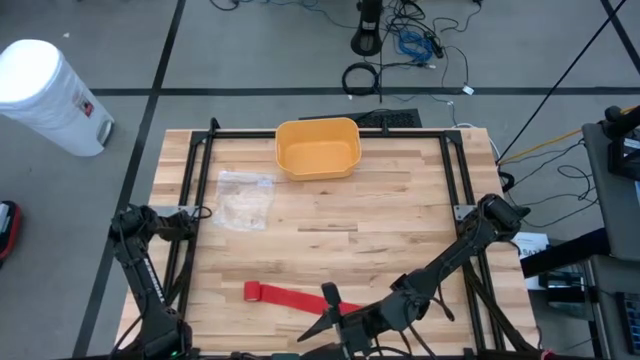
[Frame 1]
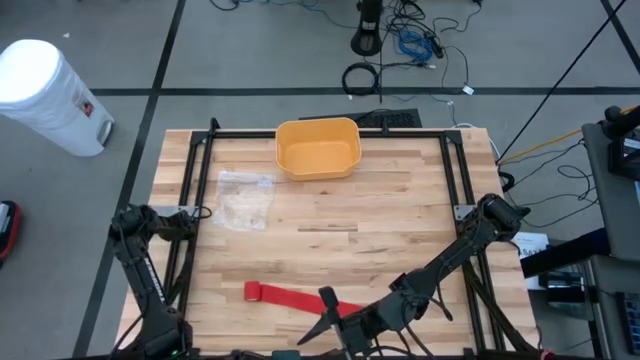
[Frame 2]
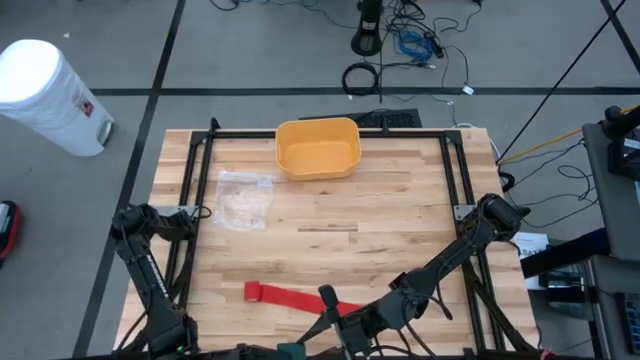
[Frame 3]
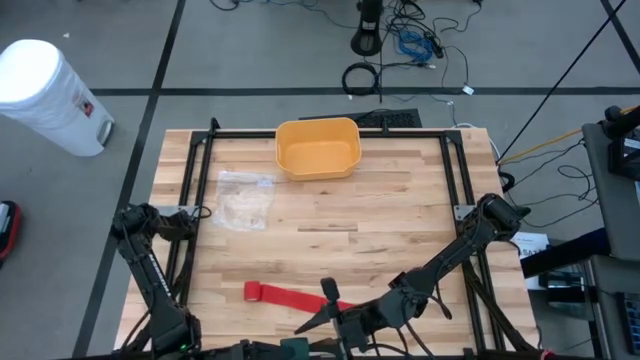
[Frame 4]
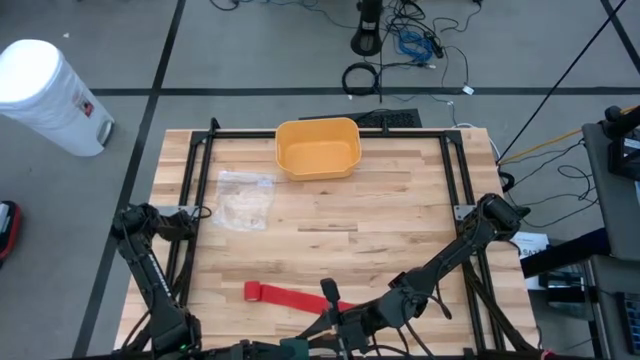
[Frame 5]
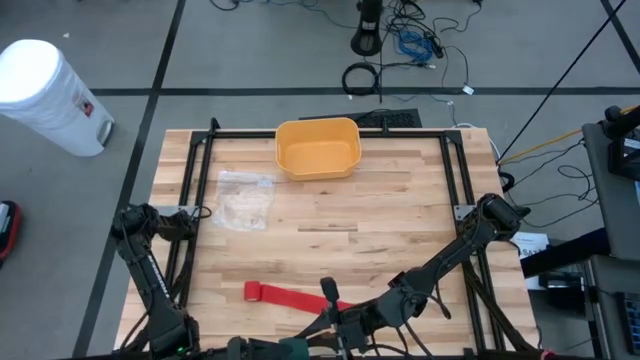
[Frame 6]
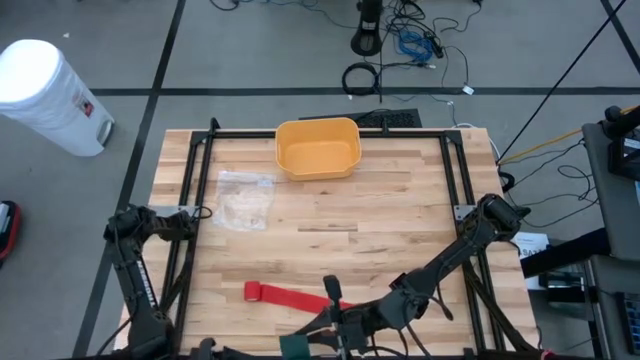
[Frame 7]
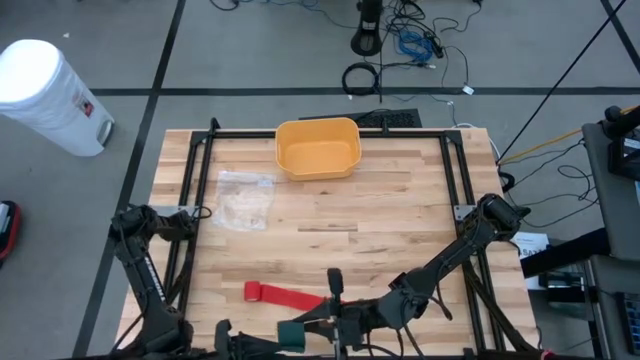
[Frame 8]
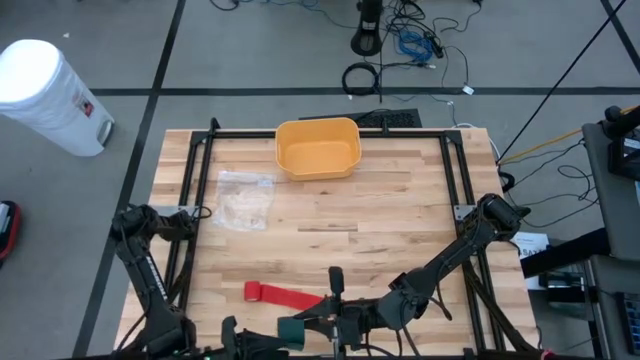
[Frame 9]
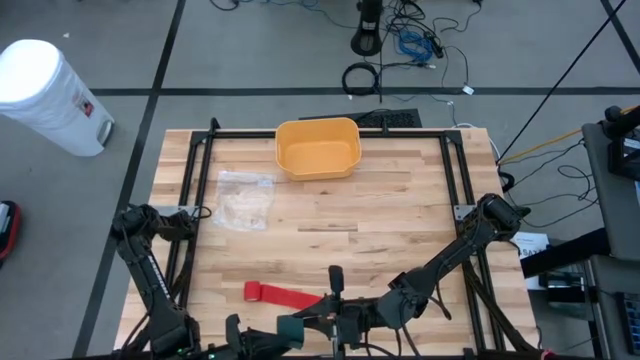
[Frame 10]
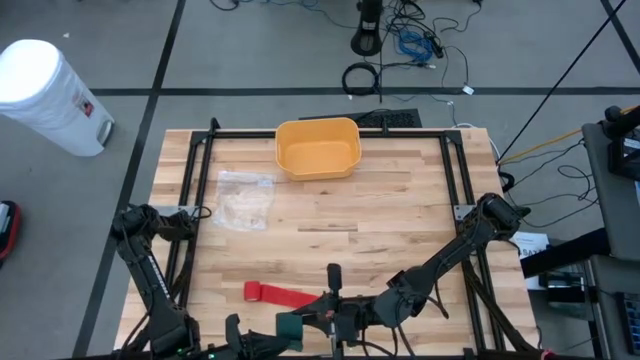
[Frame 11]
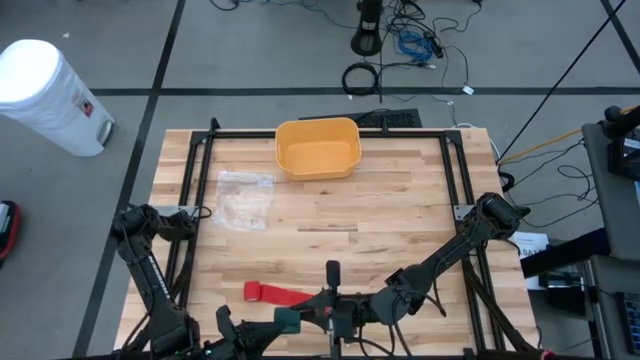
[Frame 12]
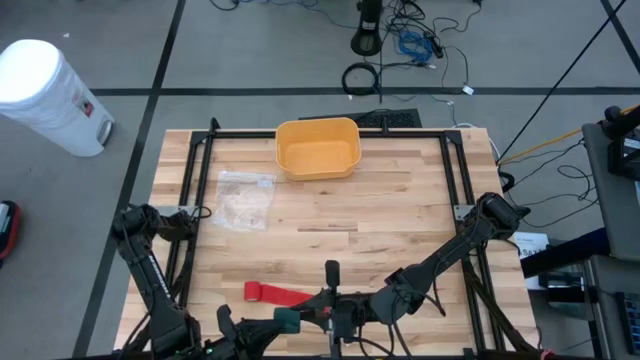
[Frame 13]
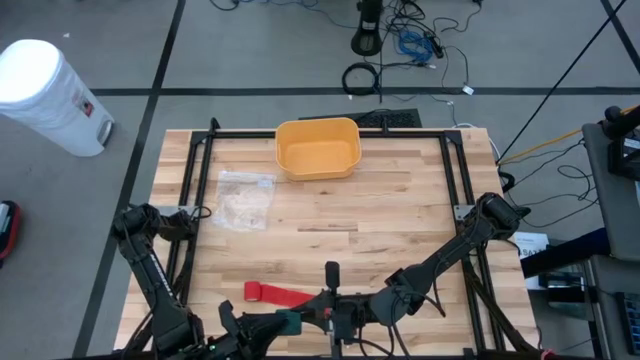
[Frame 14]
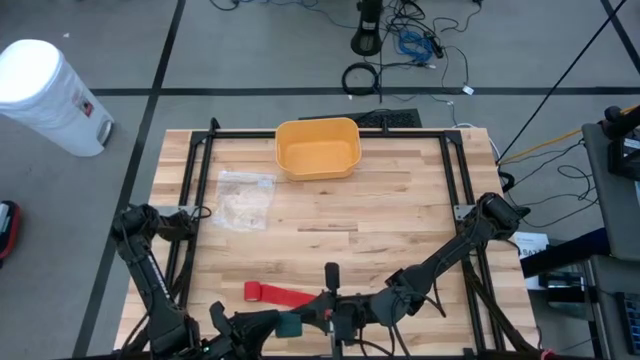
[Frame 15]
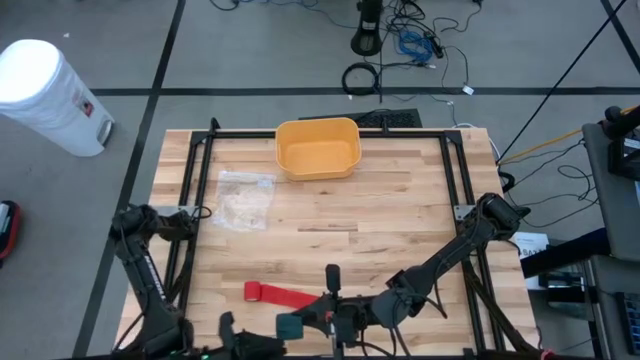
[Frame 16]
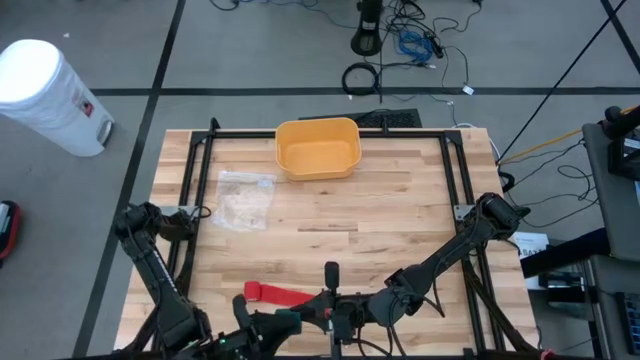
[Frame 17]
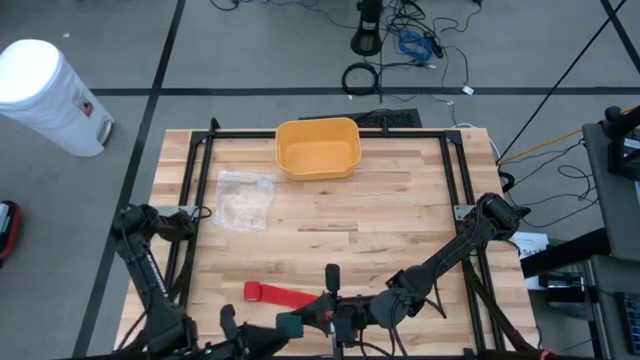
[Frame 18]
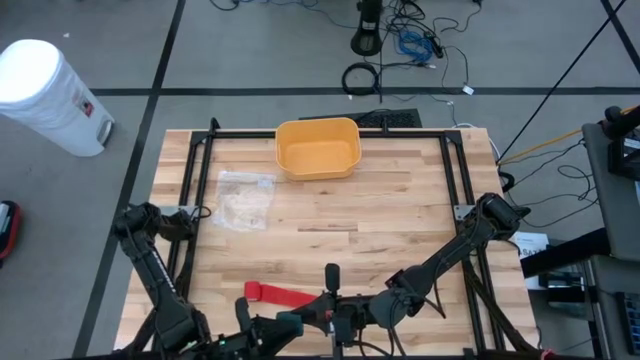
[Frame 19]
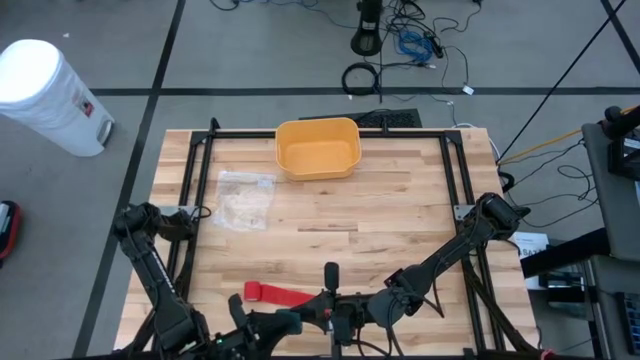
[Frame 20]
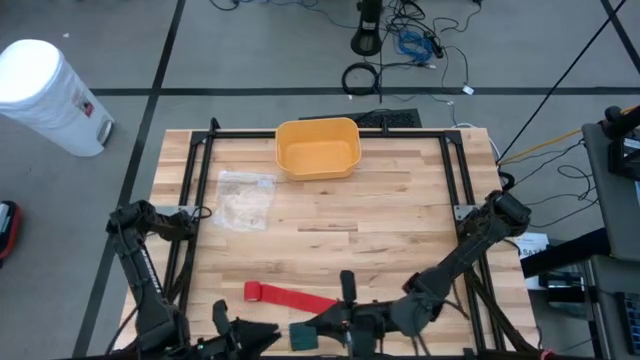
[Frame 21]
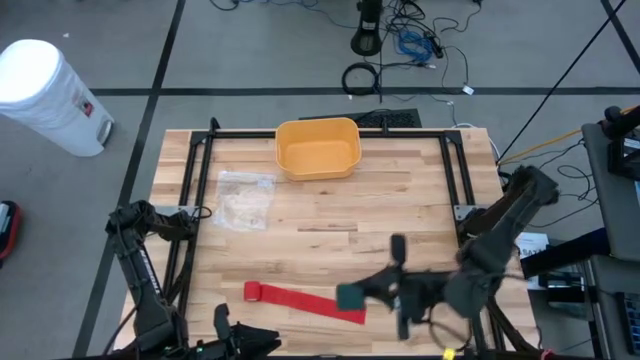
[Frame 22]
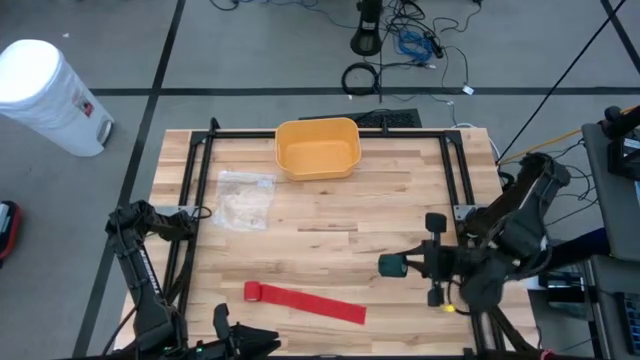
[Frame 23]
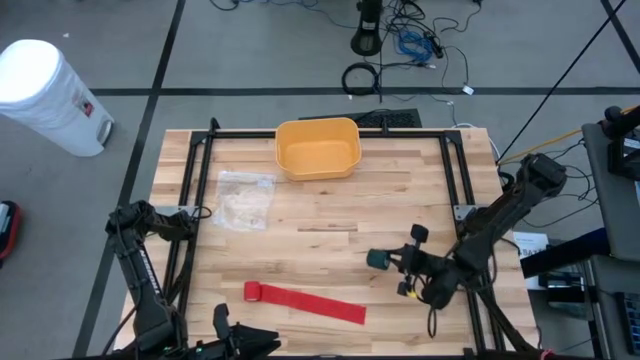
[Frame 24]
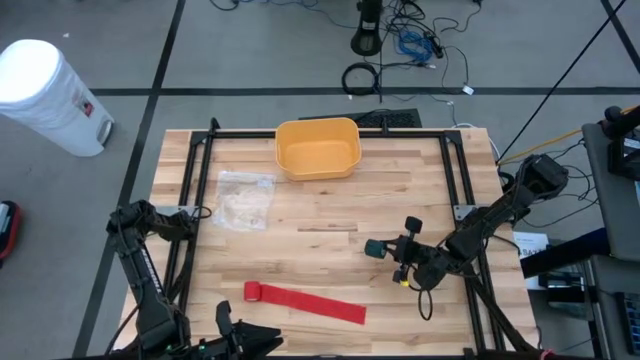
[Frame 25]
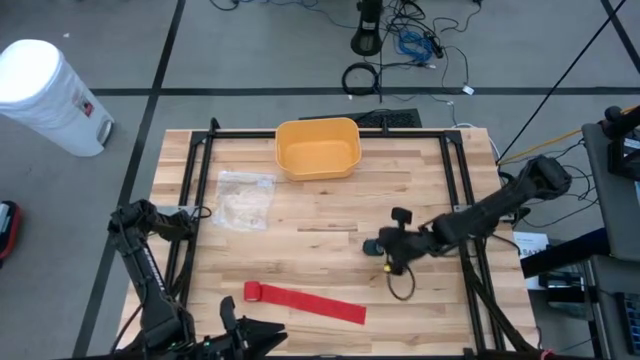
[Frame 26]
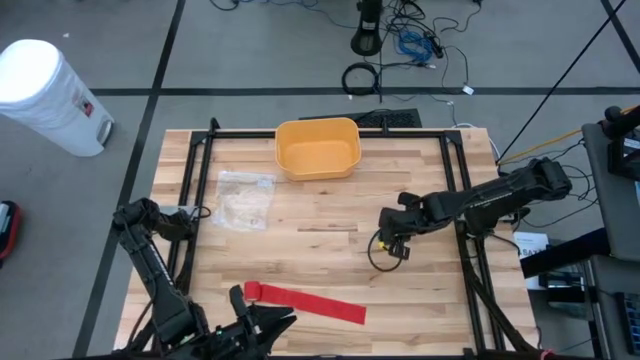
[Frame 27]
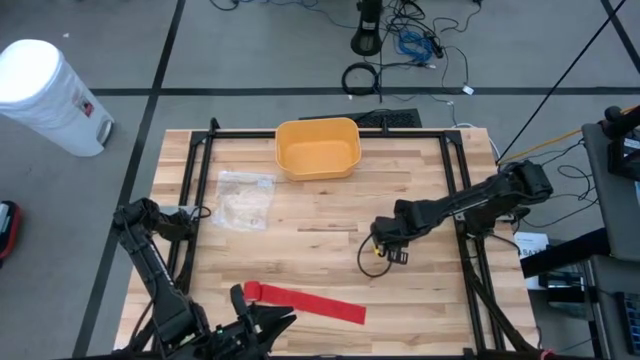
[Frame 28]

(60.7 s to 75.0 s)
Task: Roll bandage
Roll the green bandage

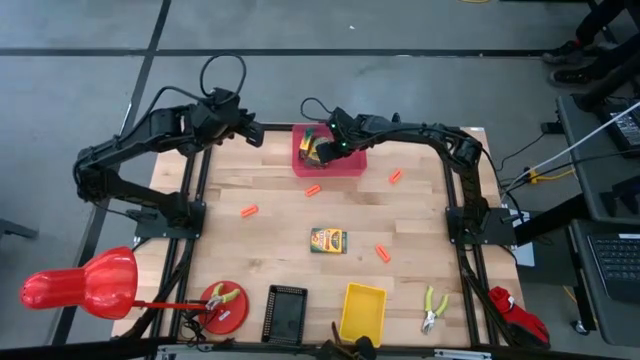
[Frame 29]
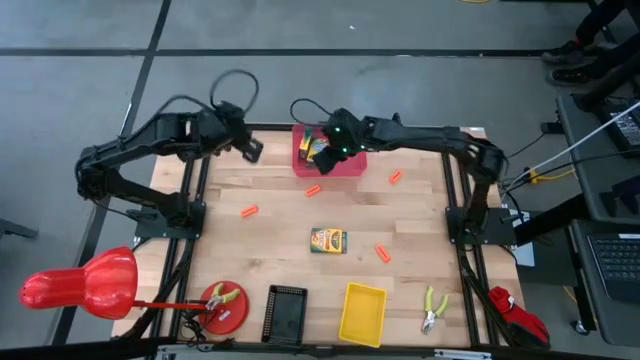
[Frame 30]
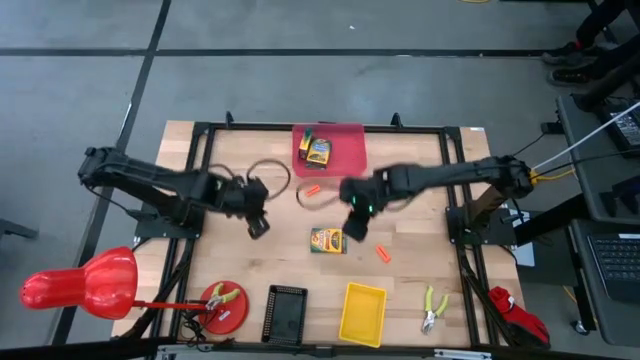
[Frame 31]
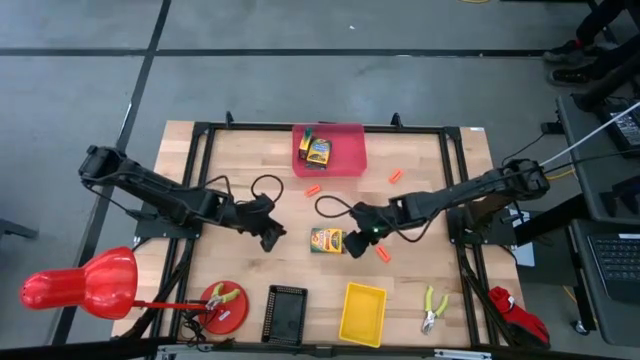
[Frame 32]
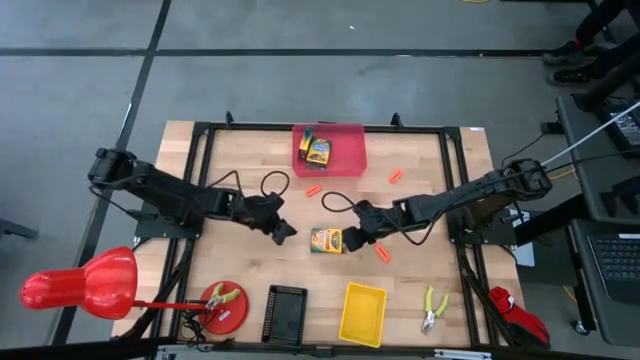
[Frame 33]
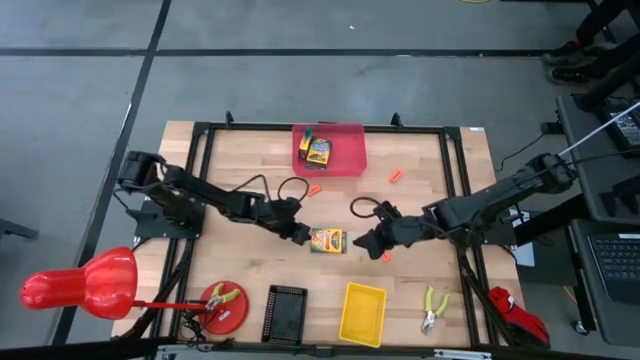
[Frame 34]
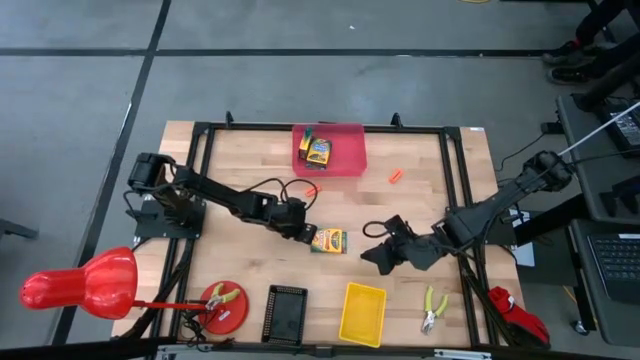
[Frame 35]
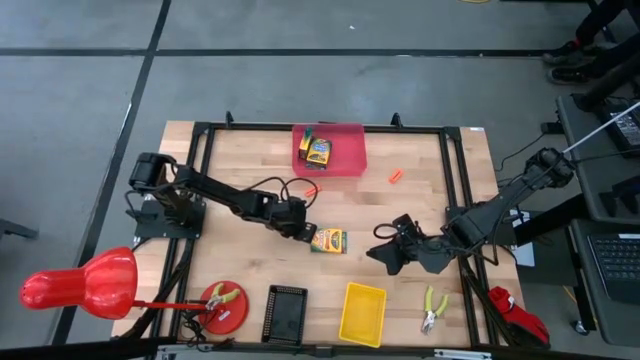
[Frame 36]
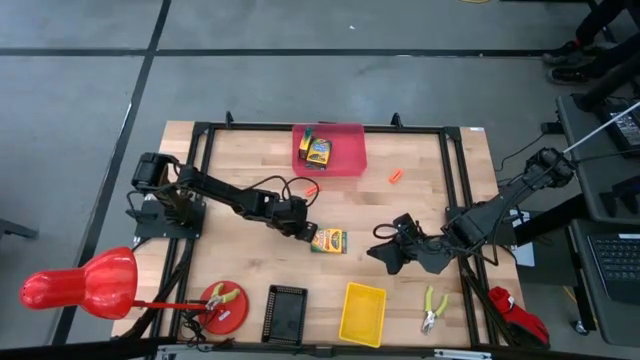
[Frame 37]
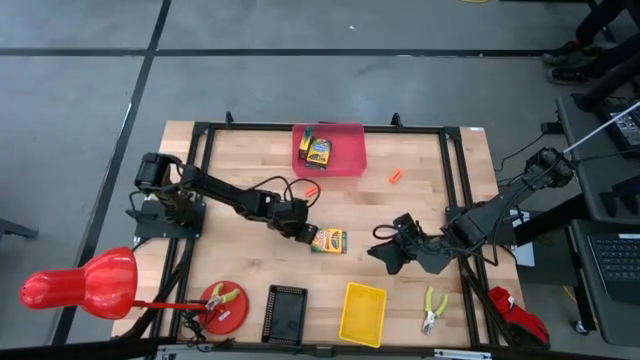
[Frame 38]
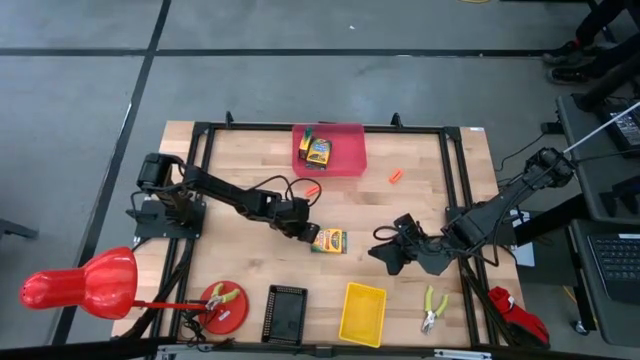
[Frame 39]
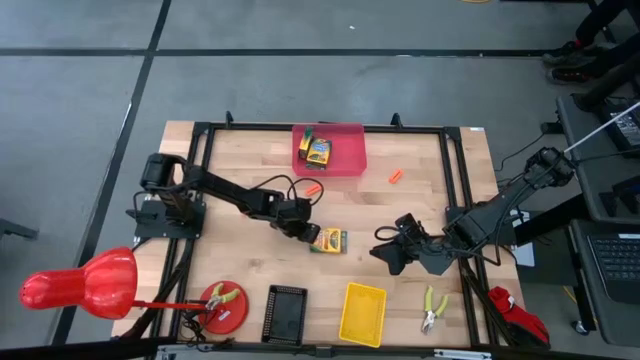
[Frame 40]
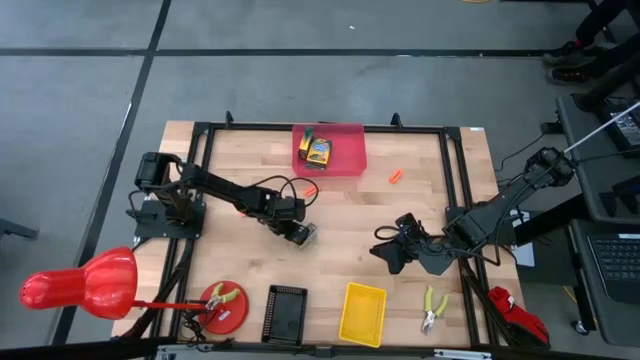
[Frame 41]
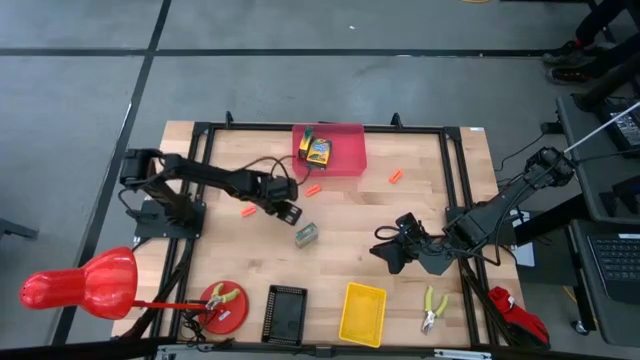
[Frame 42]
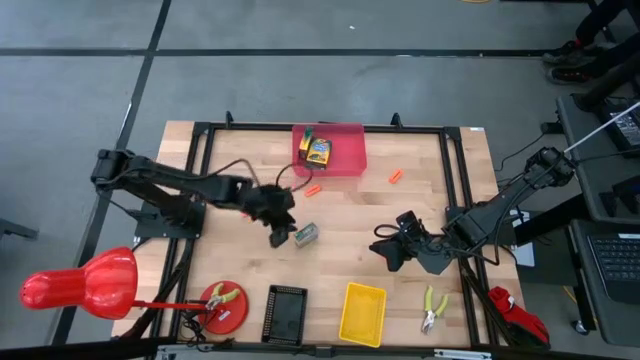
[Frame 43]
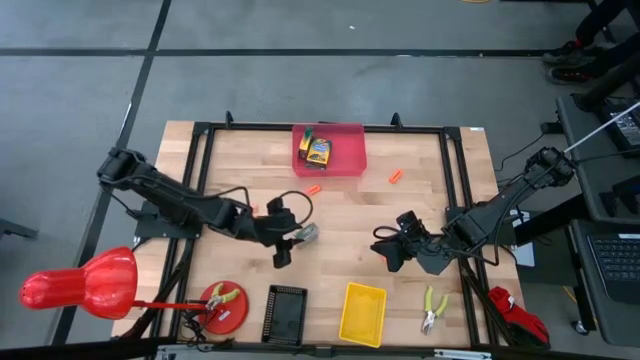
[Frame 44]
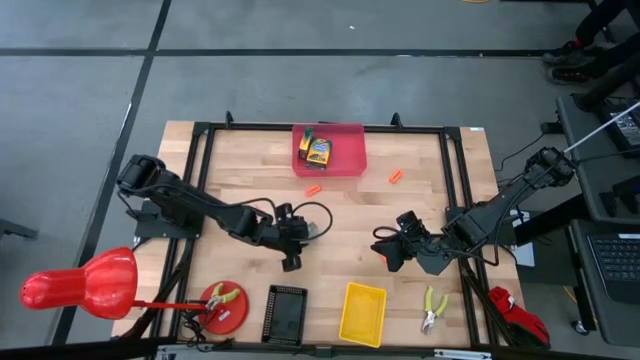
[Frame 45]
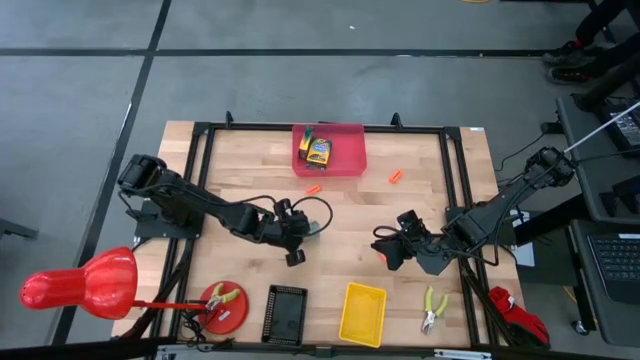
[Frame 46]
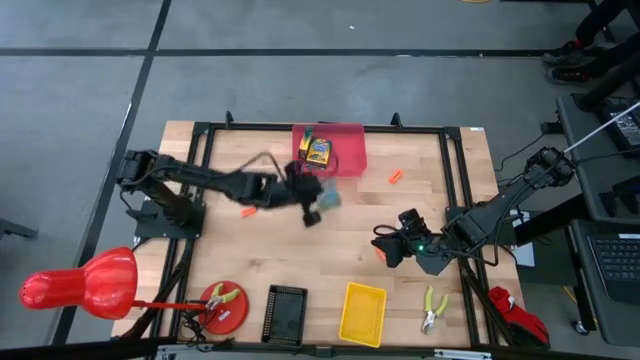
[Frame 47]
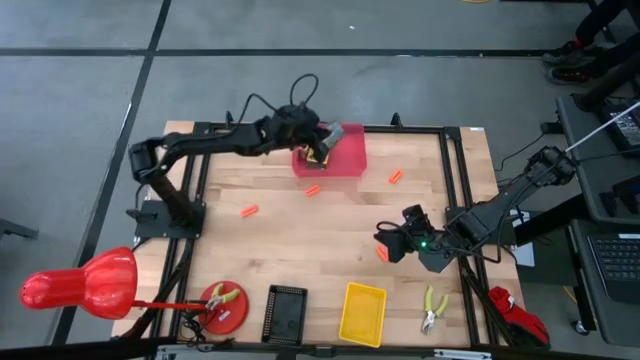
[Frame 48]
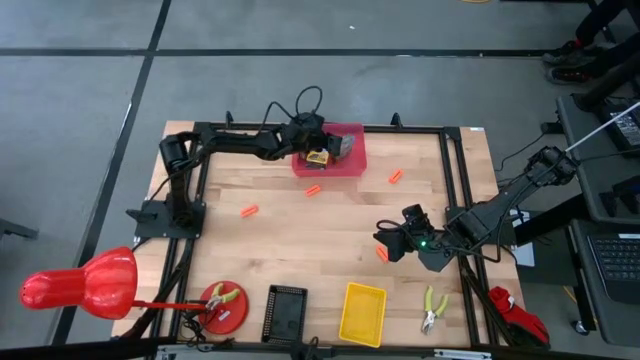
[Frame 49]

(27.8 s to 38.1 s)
Task: Pick & Place School Supplies
Put the yellow crayon box into the red bin
